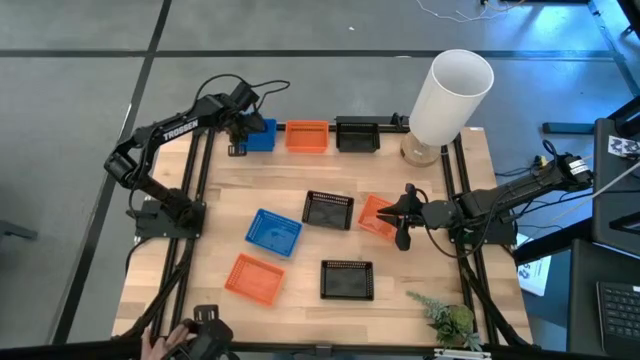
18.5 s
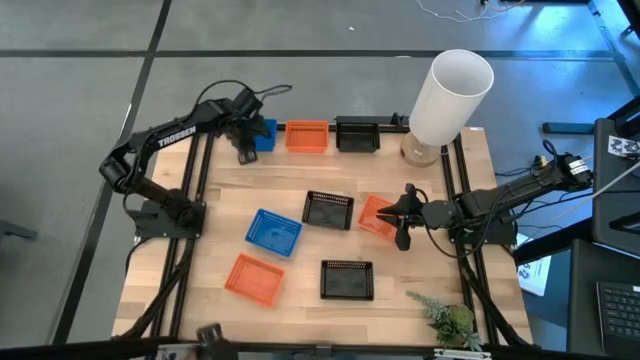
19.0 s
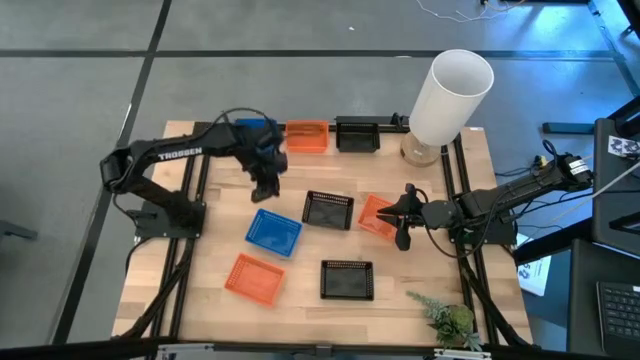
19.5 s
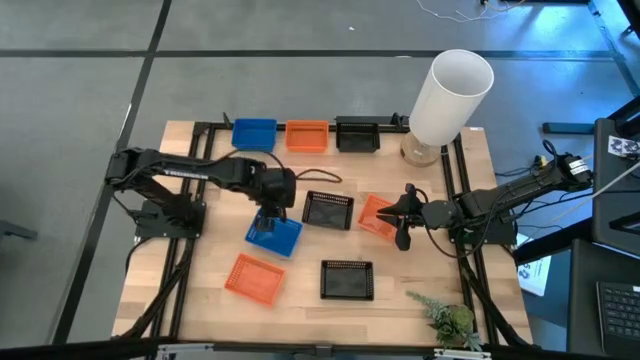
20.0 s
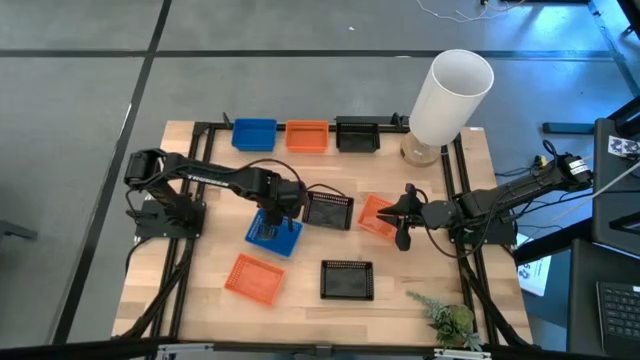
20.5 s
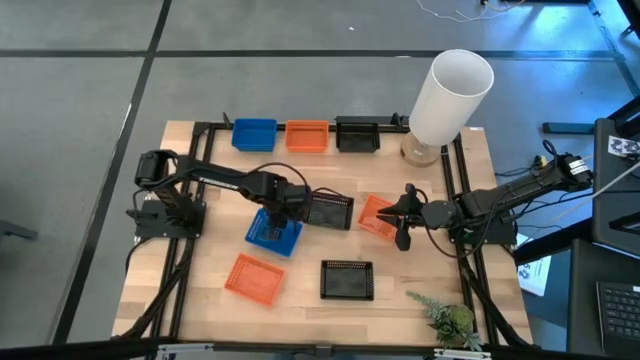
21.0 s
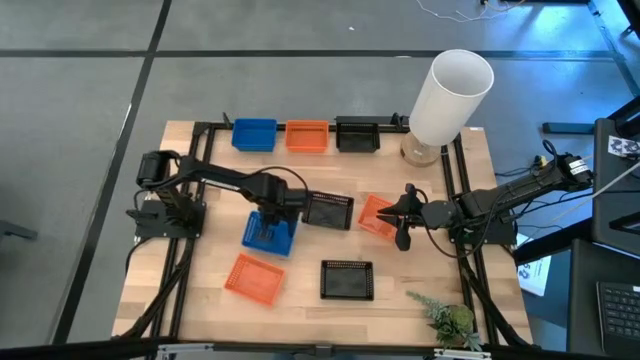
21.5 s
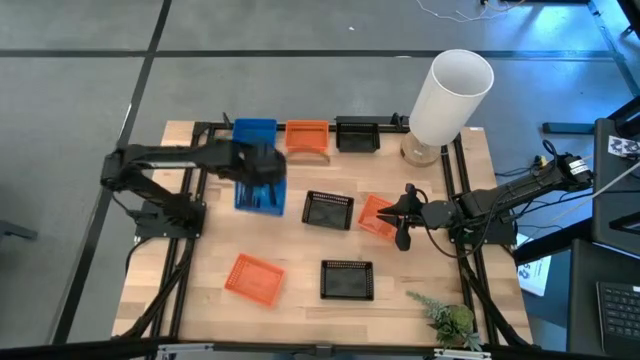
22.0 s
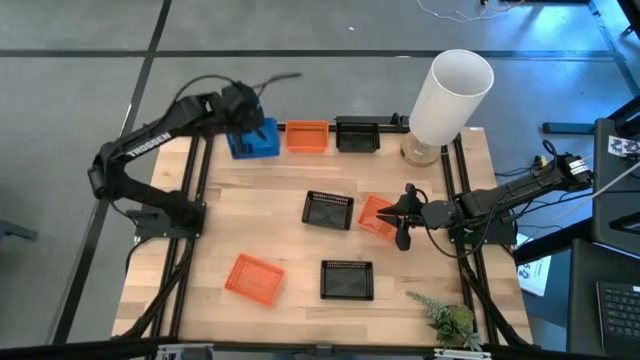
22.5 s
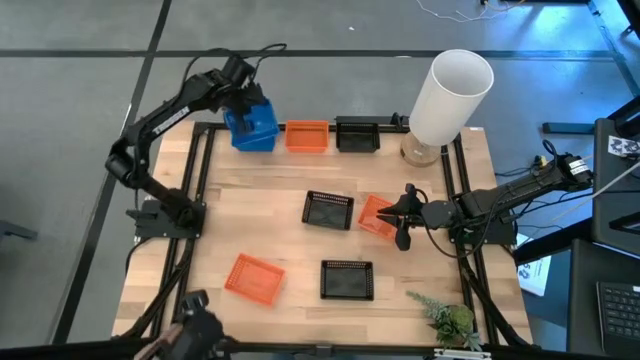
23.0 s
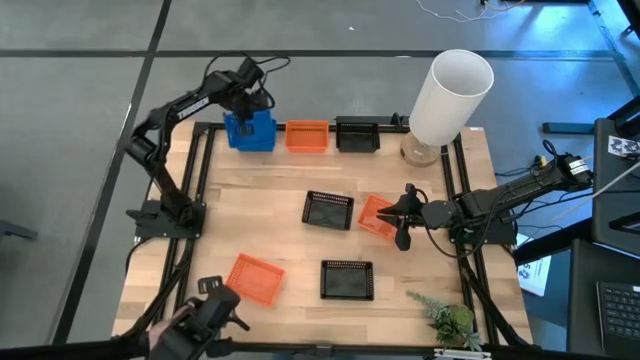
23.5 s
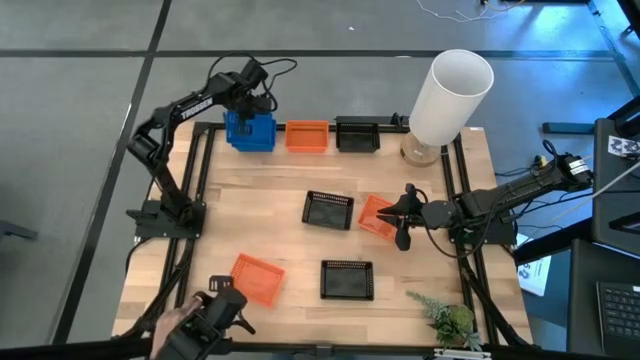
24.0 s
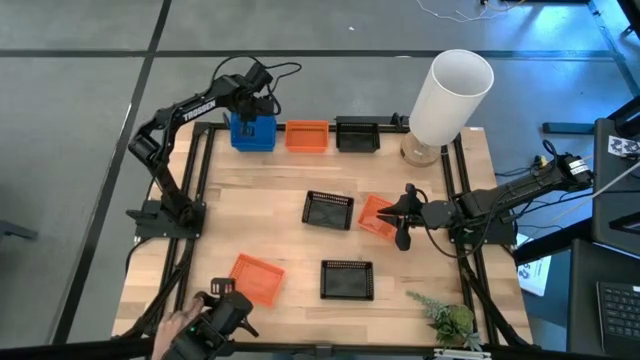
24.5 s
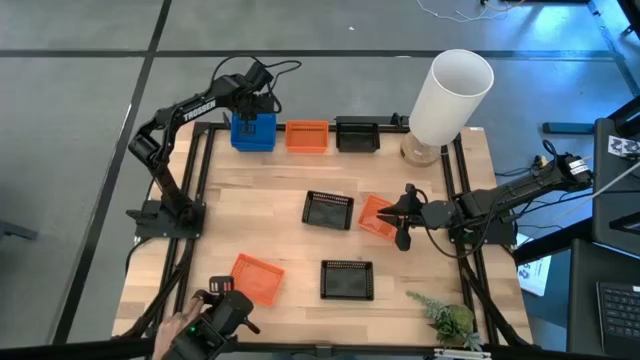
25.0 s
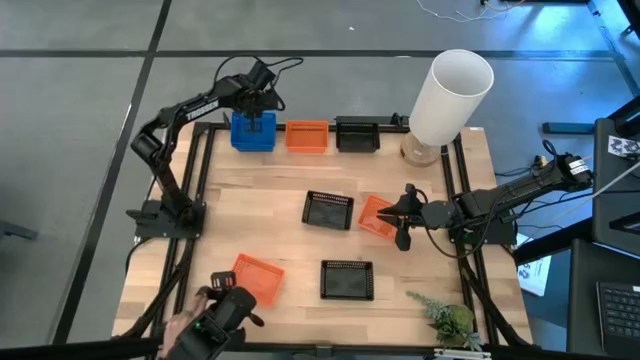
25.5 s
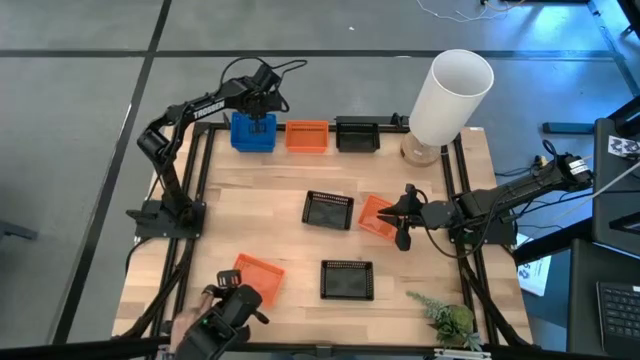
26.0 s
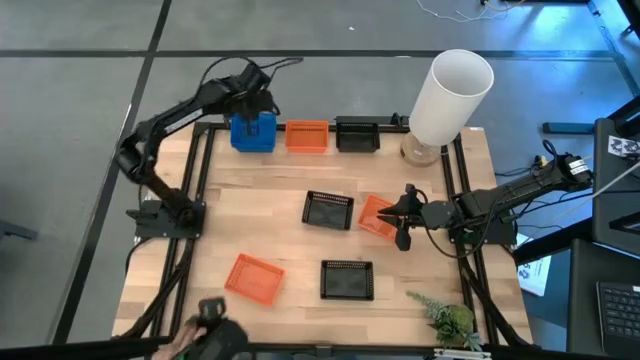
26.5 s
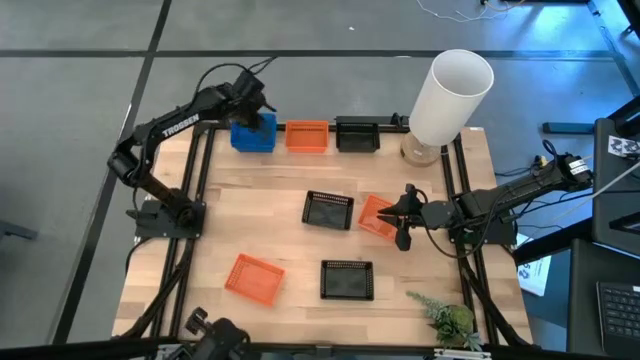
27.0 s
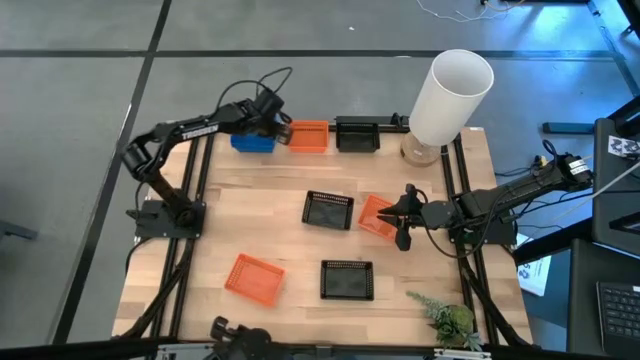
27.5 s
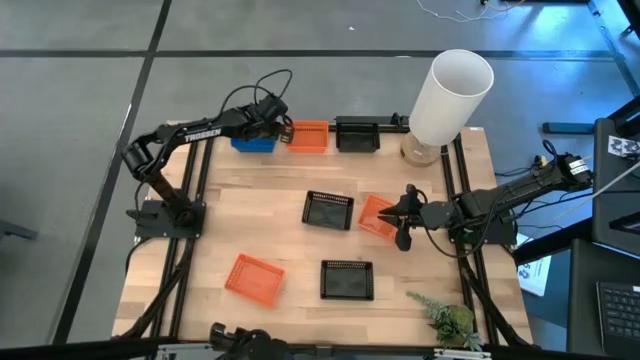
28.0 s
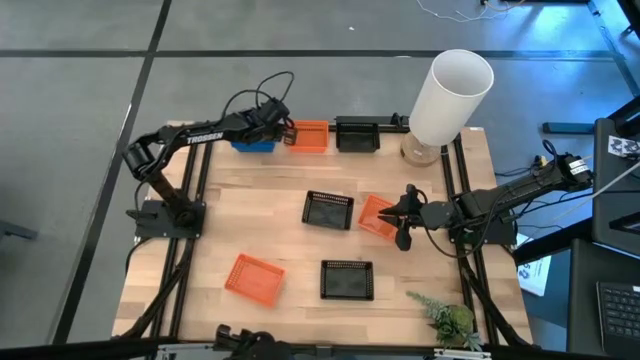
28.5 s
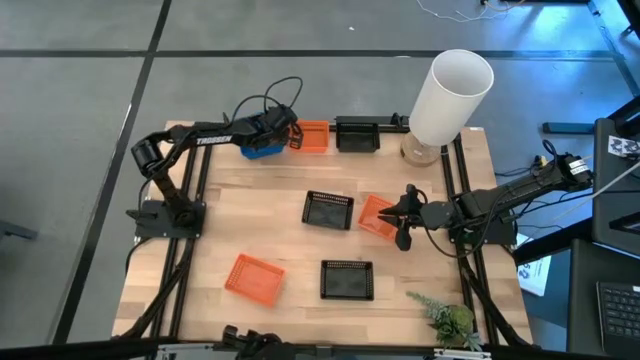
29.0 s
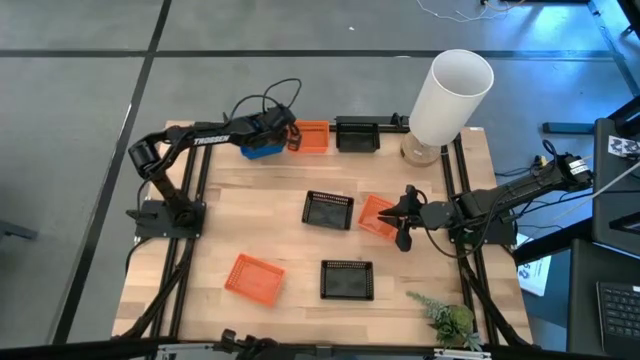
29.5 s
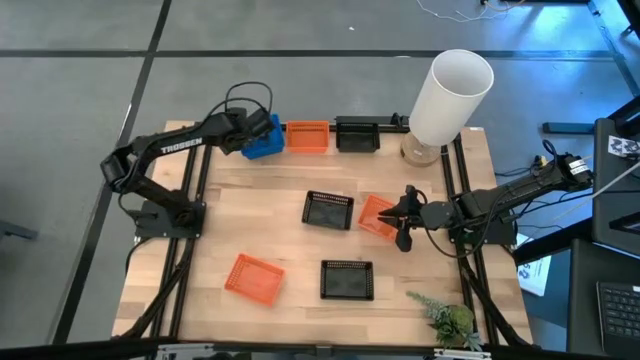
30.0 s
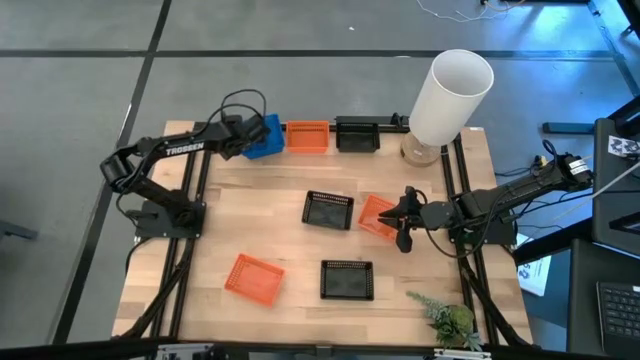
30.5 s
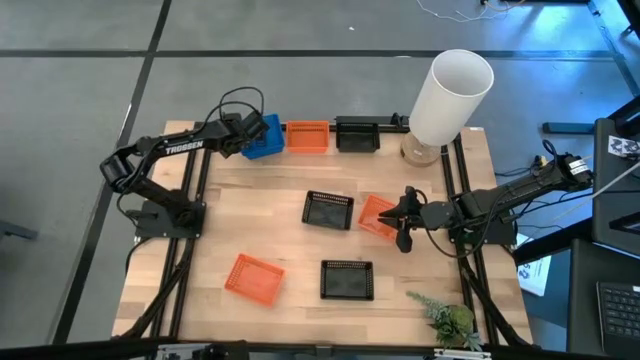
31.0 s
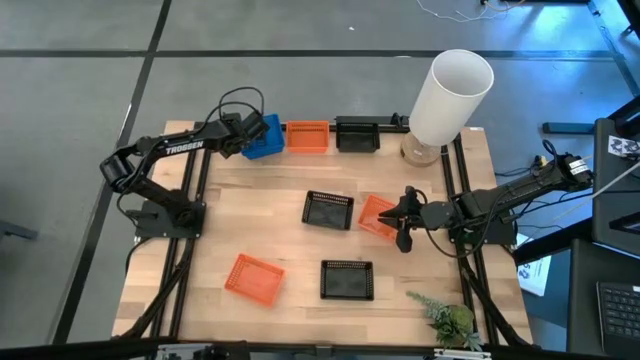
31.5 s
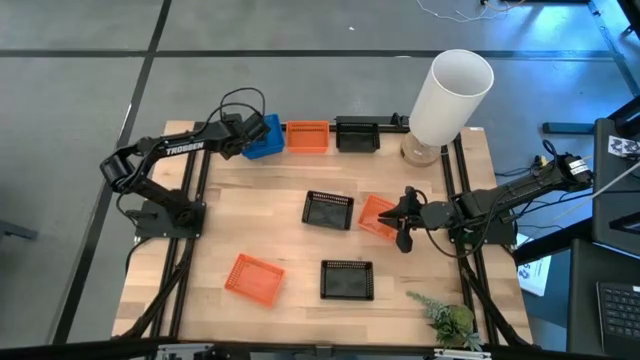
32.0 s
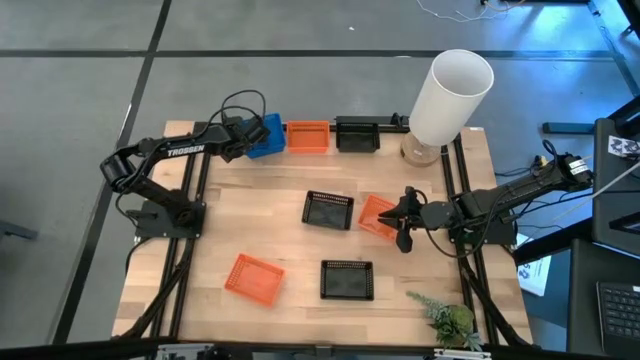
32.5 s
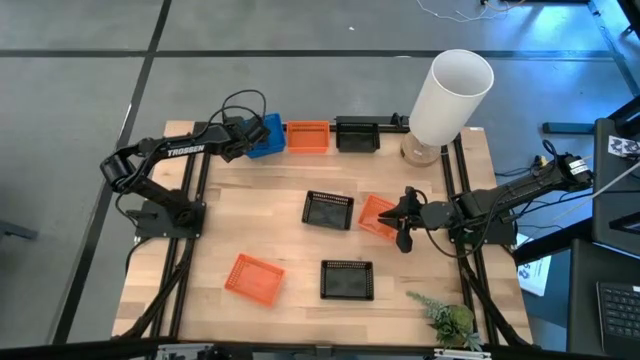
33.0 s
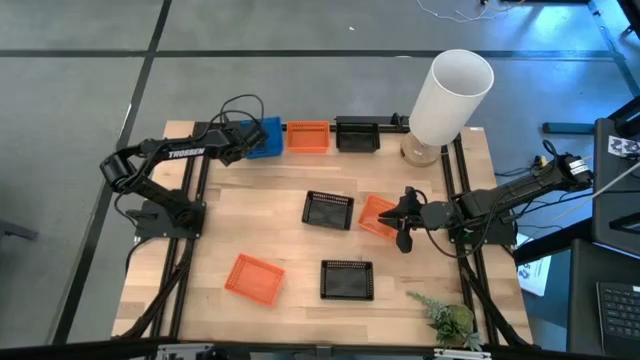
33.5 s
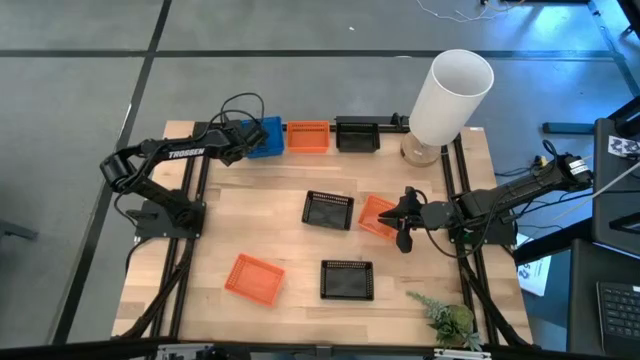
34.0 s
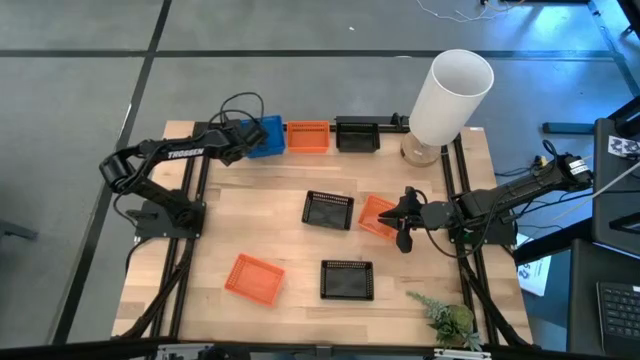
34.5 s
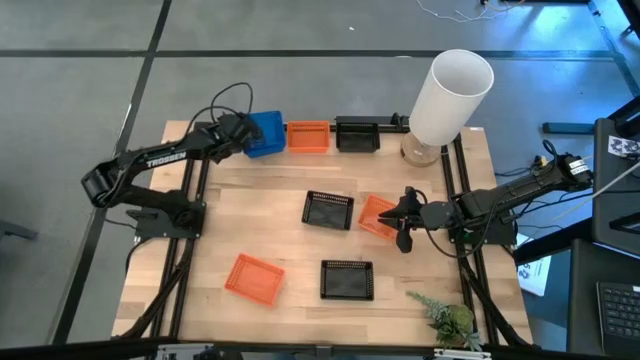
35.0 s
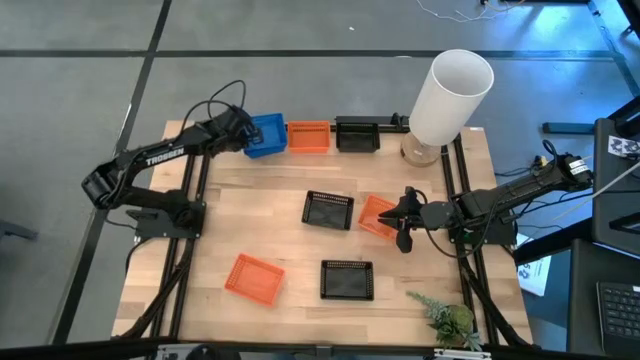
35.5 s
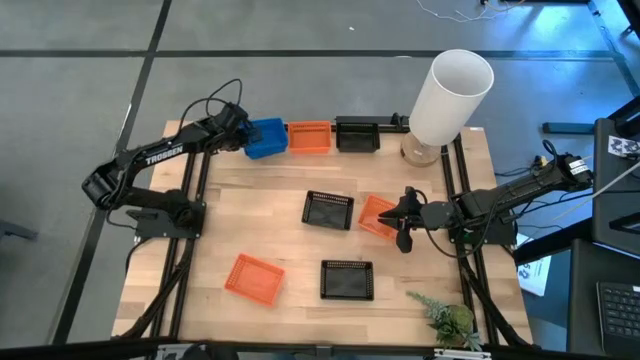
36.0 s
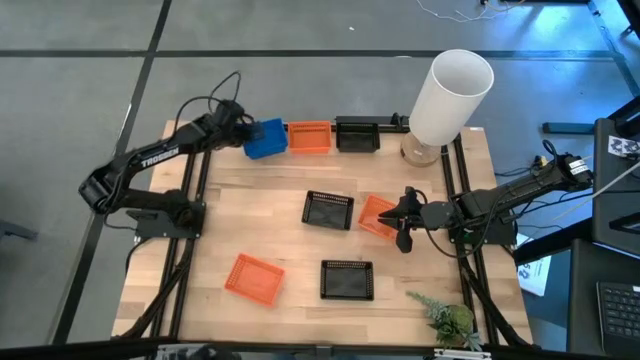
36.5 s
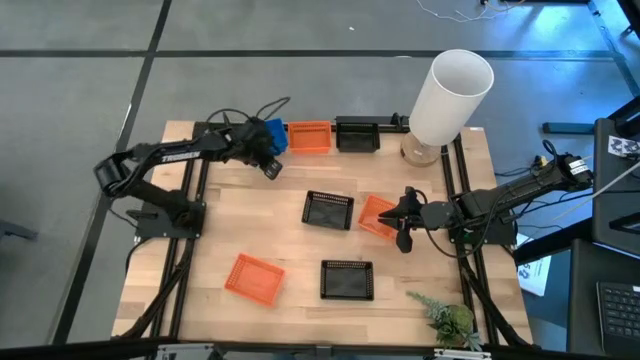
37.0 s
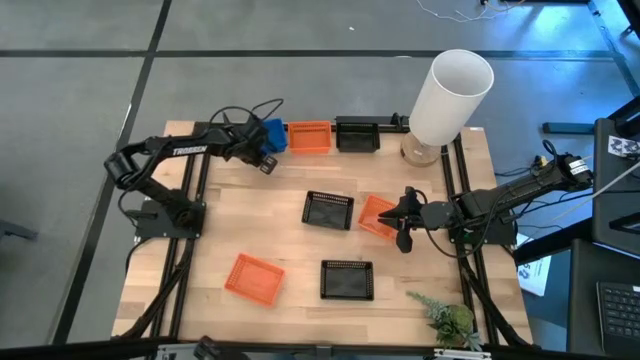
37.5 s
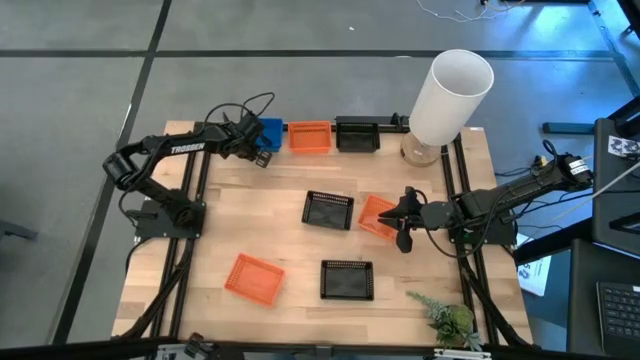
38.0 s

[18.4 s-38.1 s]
Stack the bottom blue bin on the stacked blue bins
